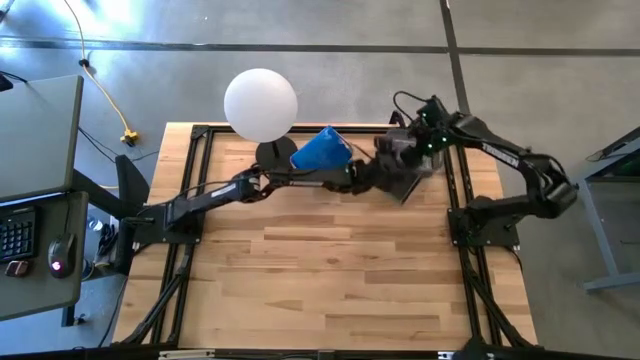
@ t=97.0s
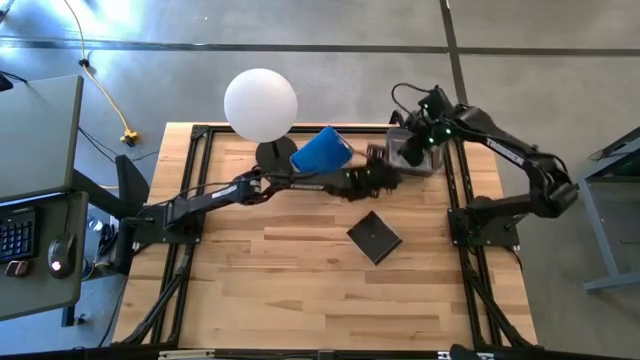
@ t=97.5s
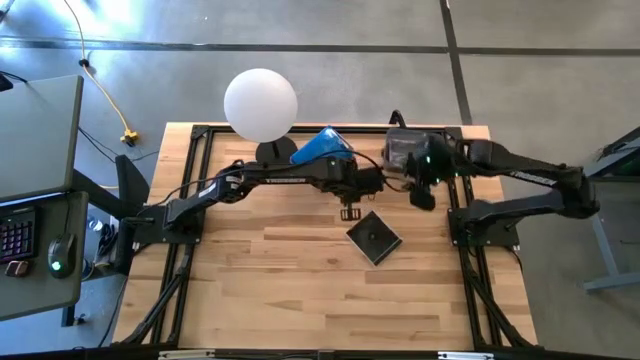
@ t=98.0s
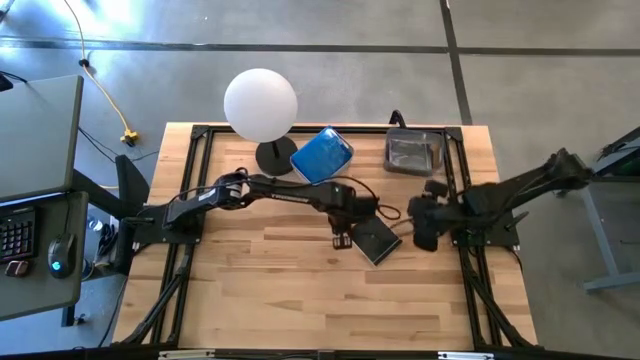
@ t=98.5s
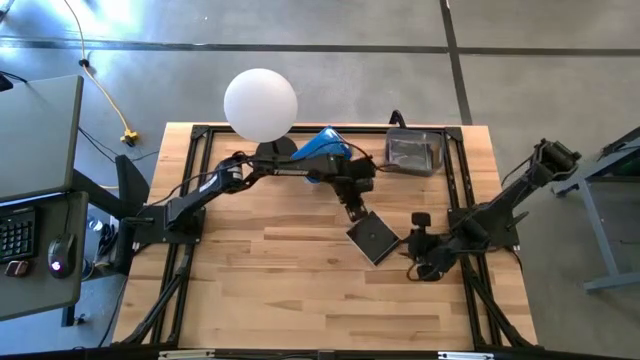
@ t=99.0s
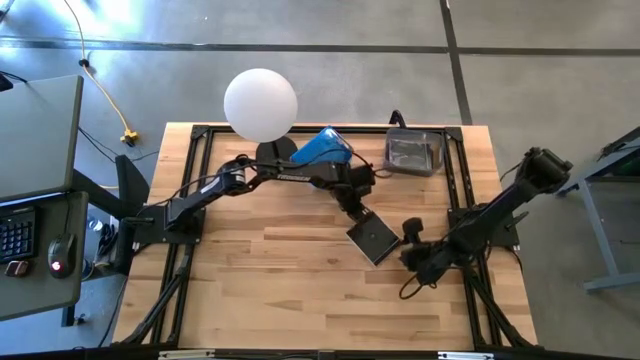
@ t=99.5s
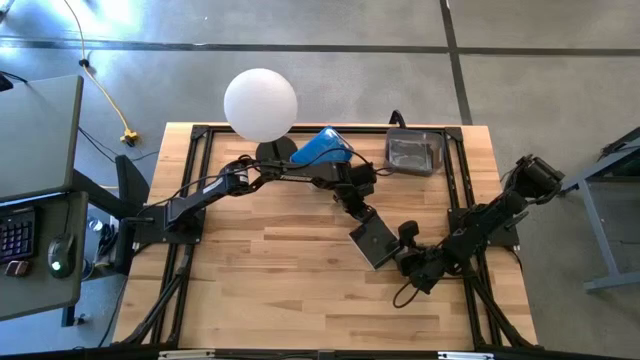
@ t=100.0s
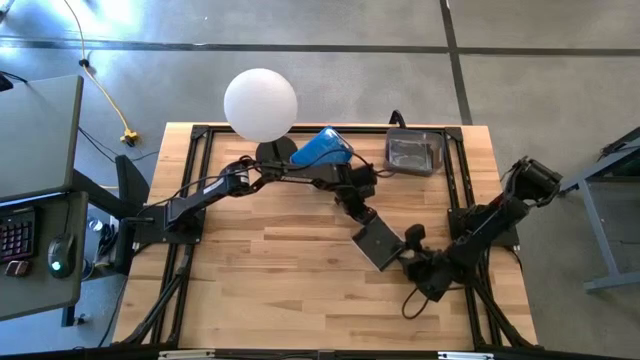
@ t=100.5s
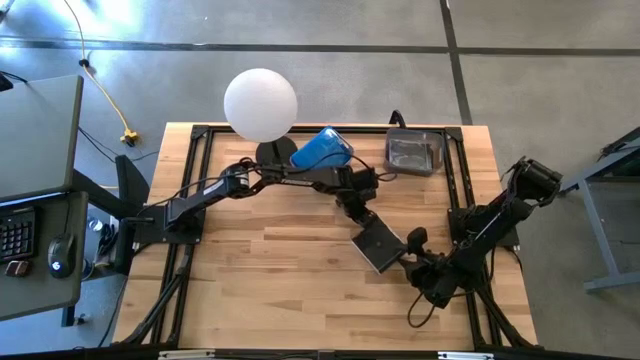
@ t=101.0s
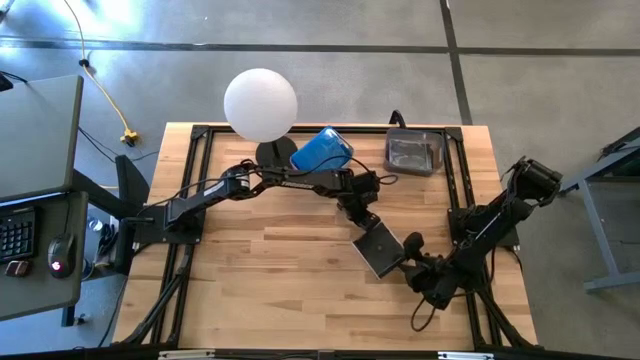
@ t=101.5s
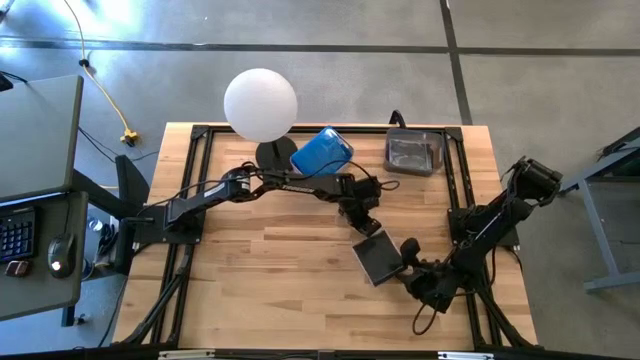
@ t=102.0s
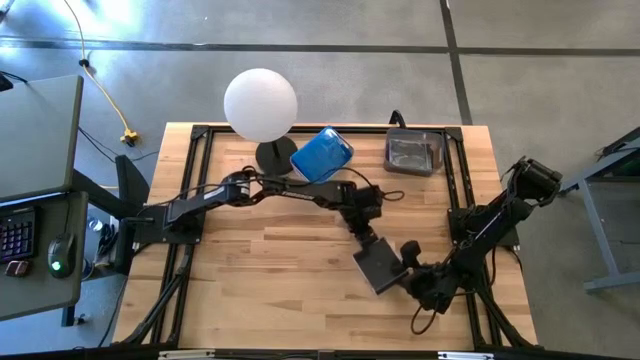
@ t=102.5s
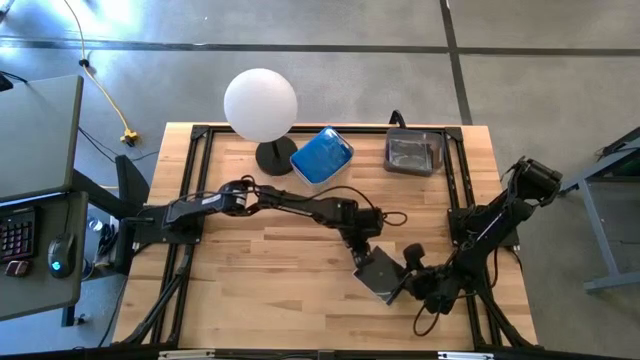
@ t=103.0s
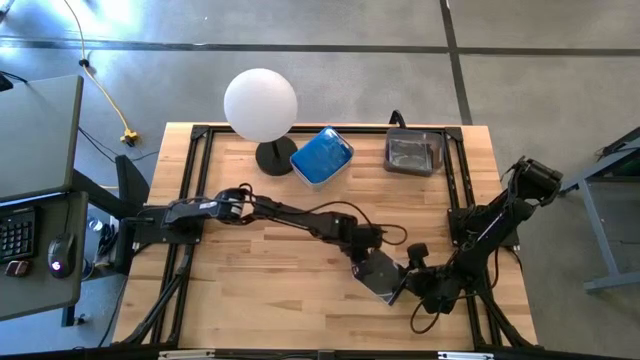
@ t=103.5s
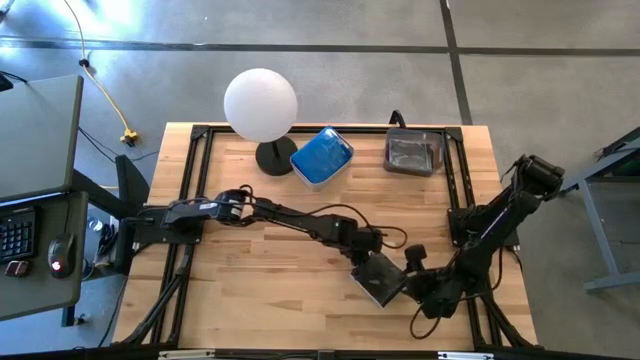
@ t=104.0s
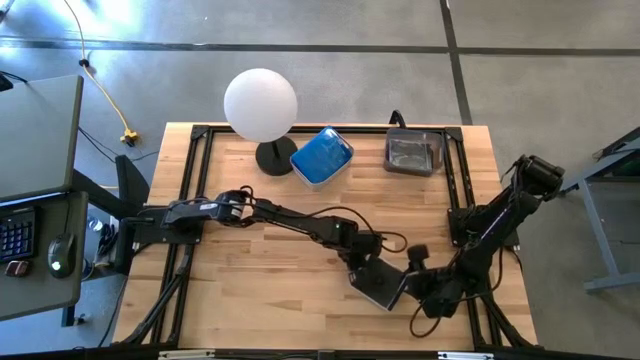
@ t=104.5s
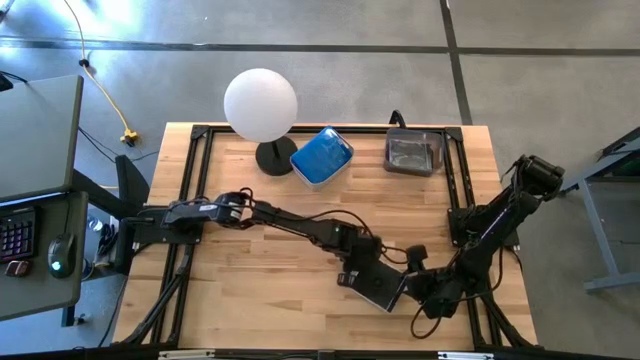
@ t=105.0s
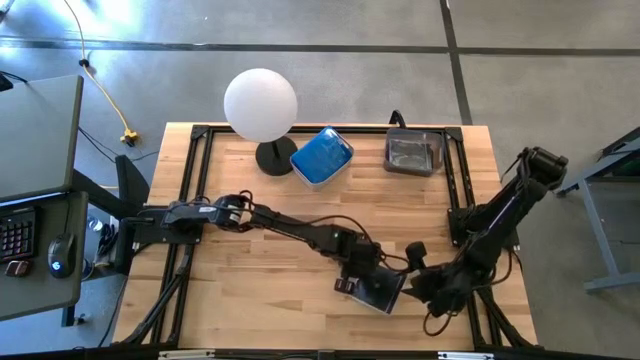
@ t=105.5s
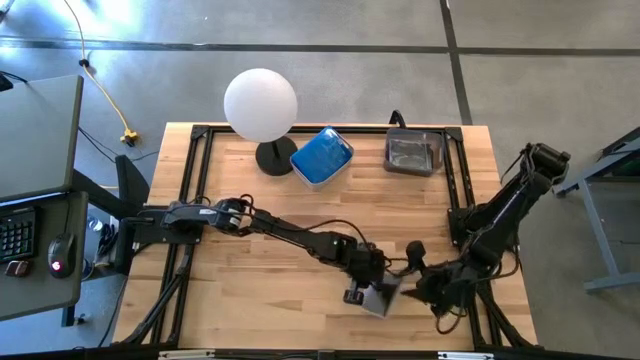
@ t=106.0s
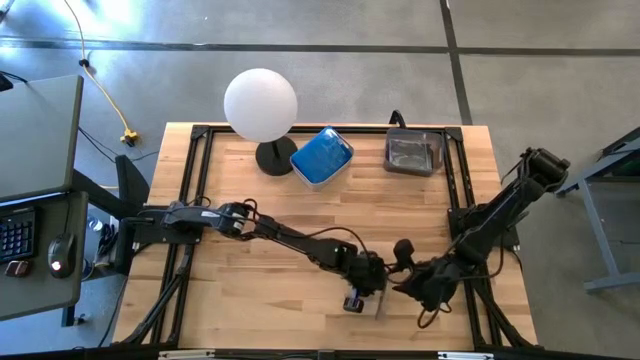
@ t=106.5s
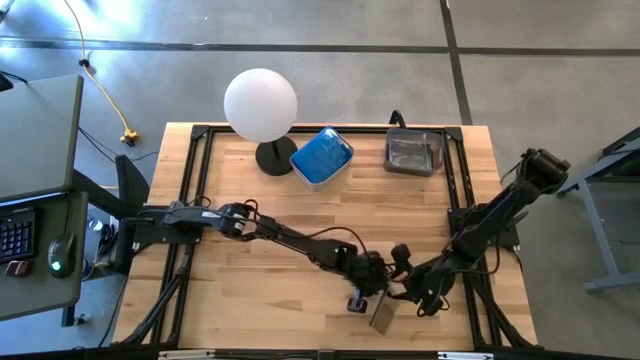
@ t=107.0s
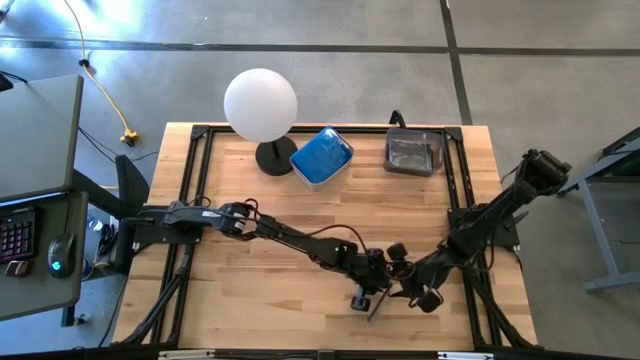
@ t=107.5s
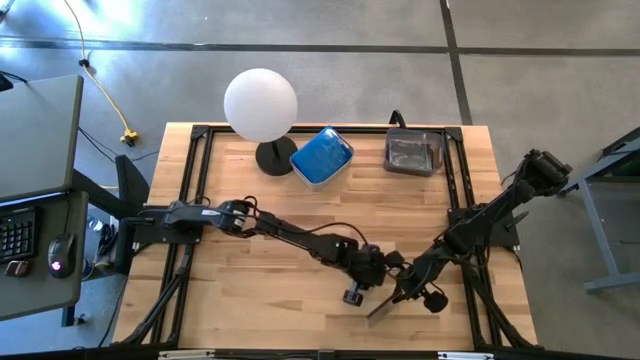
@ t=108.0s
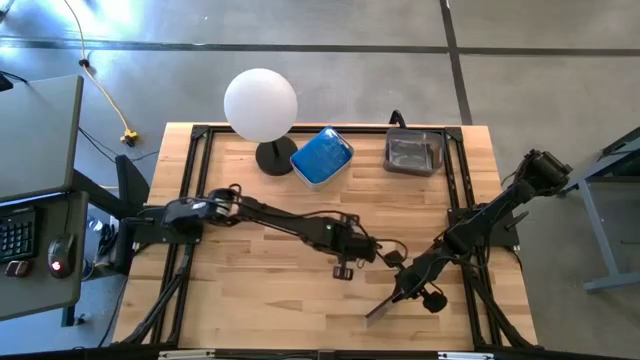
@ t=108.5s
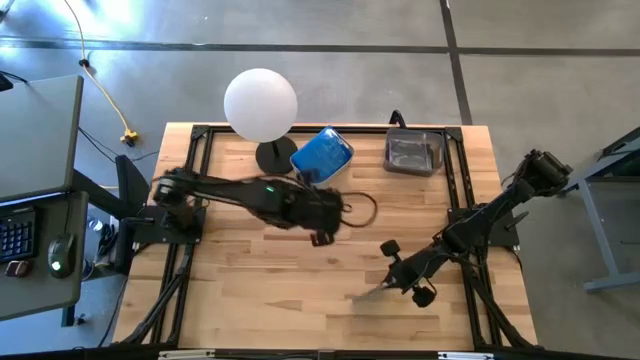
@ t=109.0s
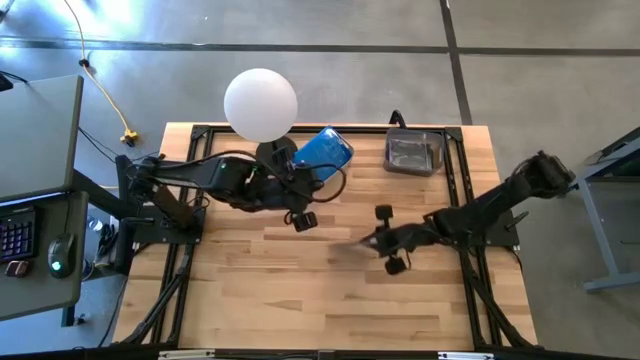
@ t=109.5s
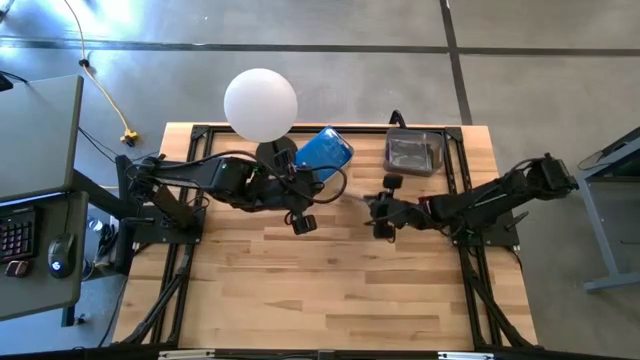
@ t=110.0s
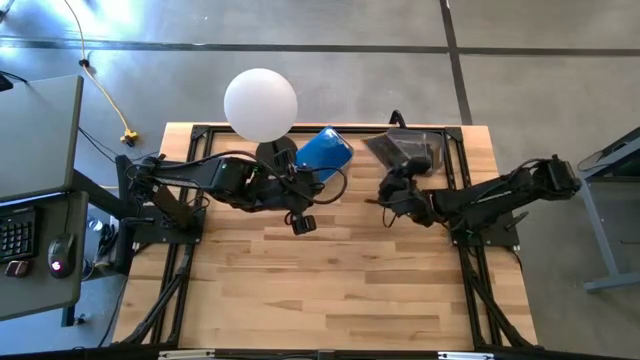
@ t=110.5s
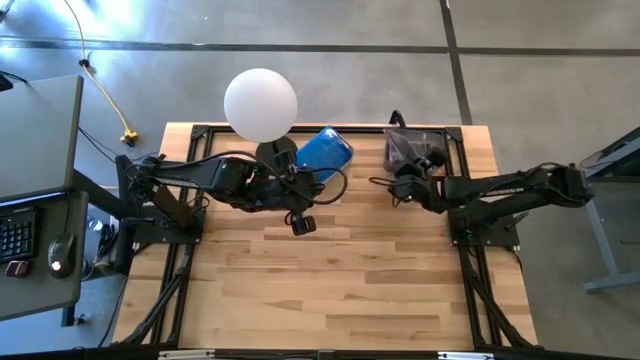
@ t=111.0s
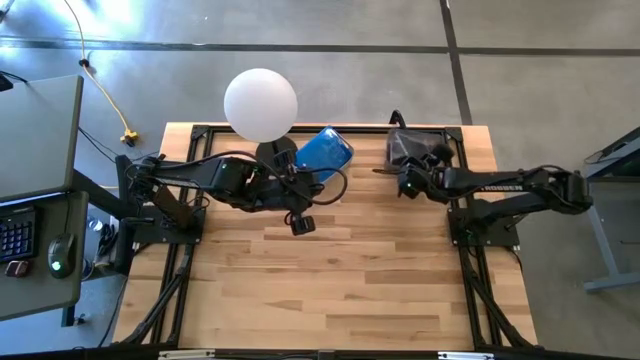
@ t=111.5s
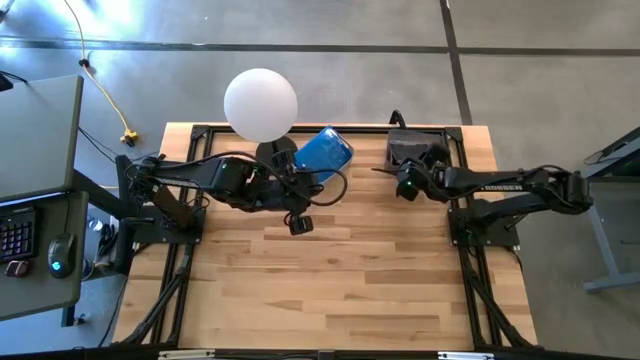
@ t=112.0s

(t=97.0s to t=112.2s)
Task: Pick & place jewel cases by type
Put the black CD case into the black bin

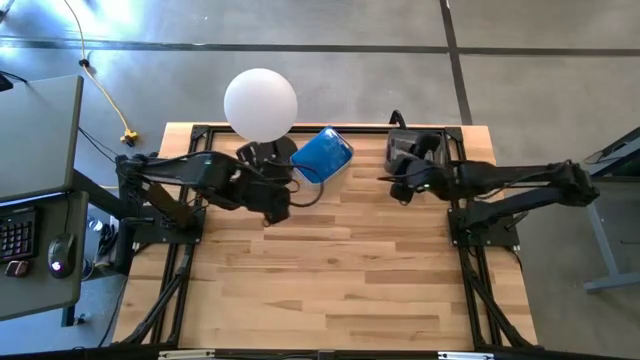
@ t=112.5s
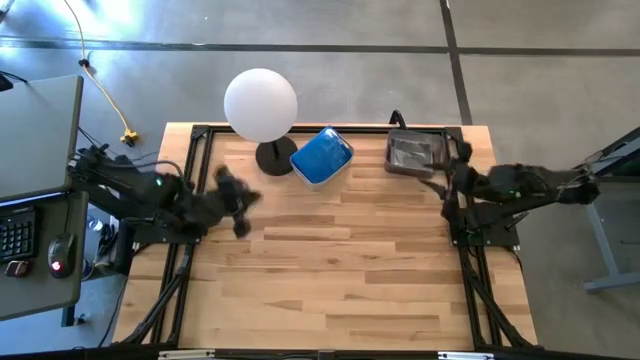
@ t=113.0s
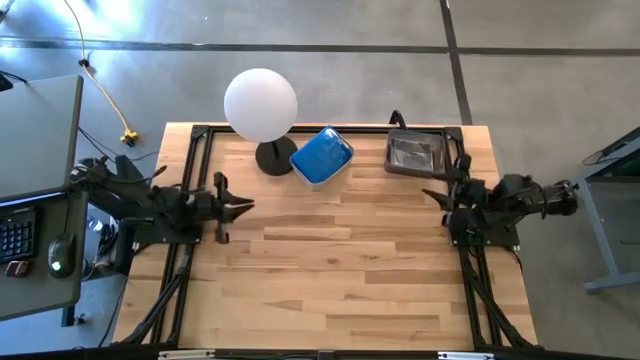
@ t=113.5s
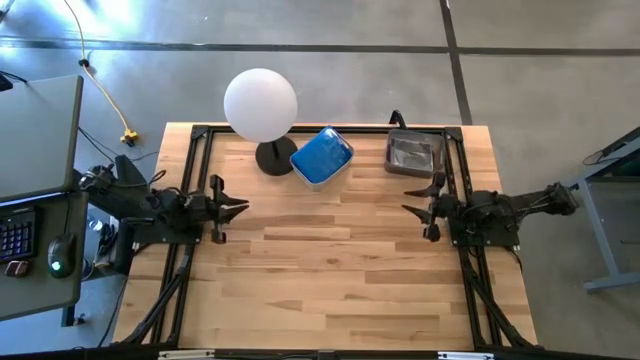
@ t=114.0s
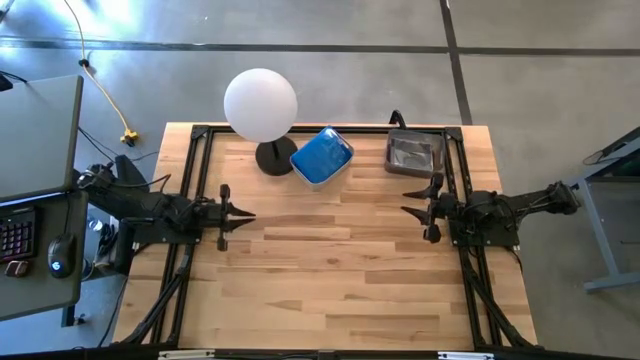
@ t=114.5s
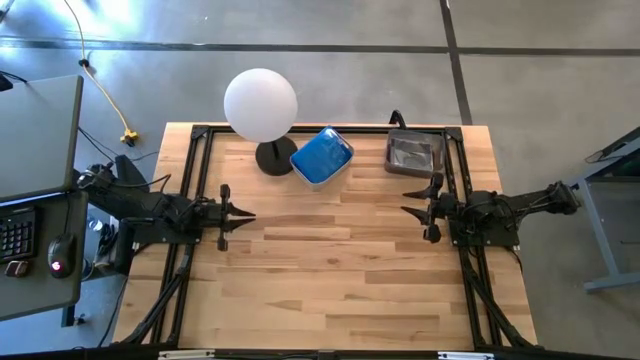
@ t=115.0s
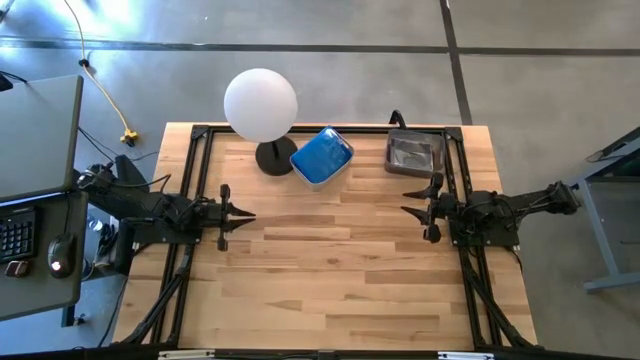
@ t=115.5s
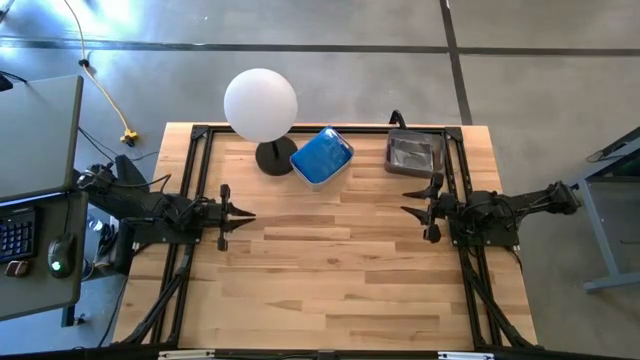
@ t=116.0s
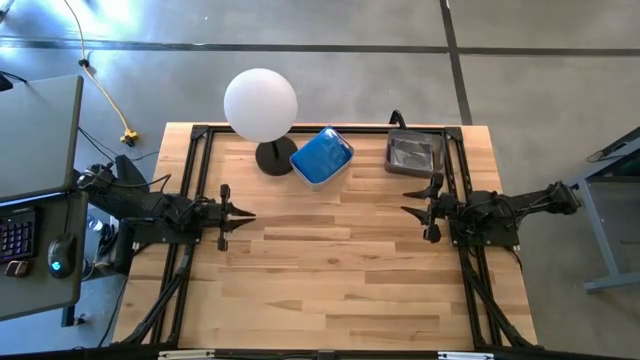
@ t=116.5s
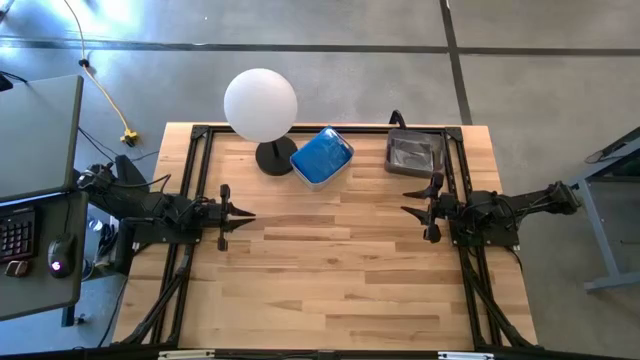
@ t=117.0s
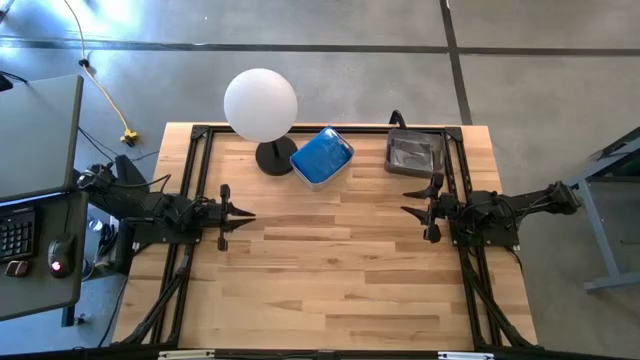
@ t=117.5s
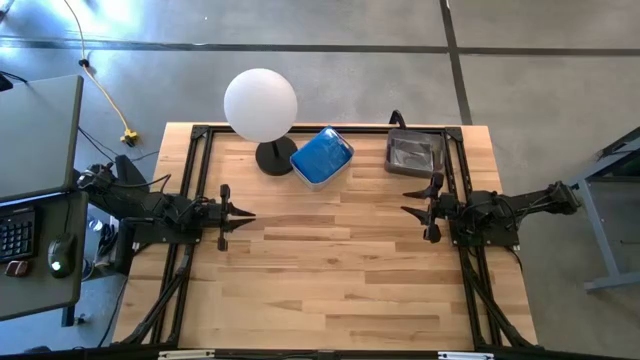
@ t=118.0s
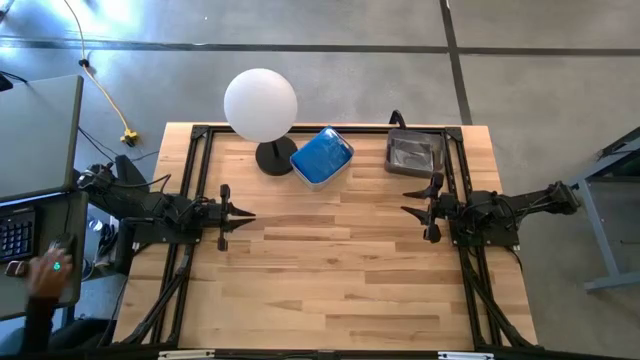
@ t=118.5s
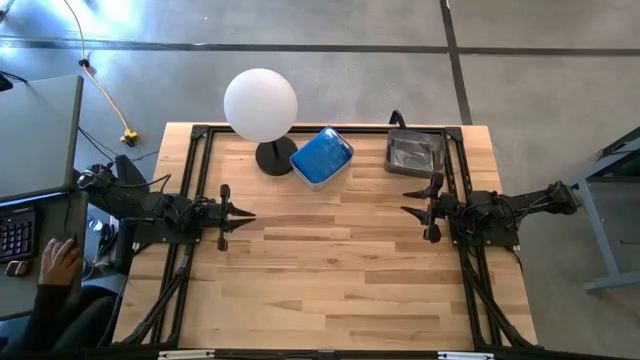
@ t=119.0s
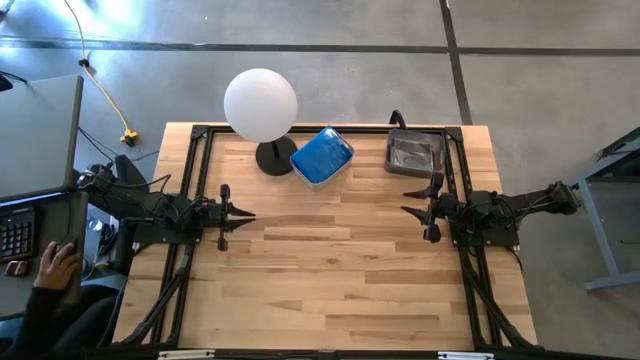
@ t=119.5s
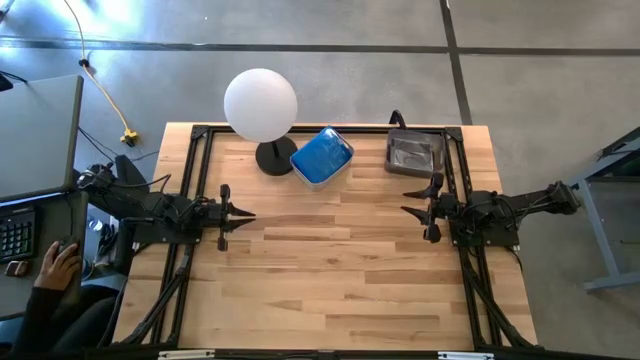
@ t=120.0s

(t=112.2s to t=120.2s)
Return to Home Position
